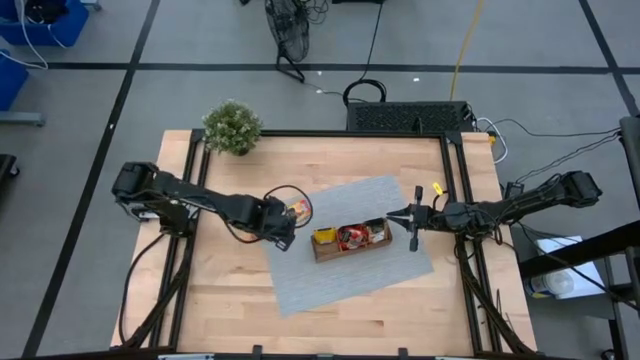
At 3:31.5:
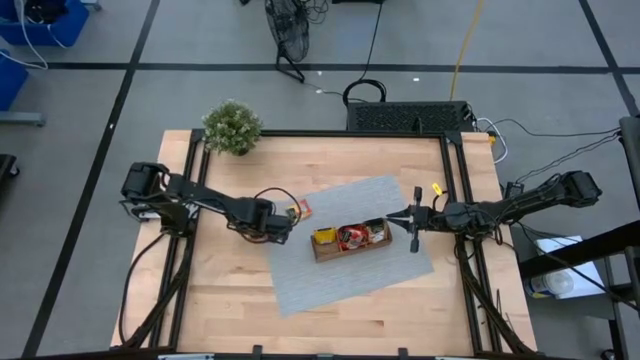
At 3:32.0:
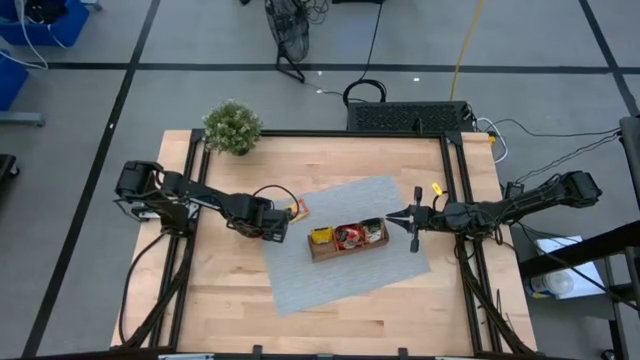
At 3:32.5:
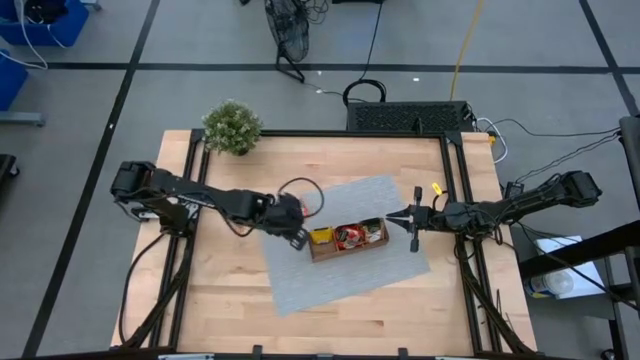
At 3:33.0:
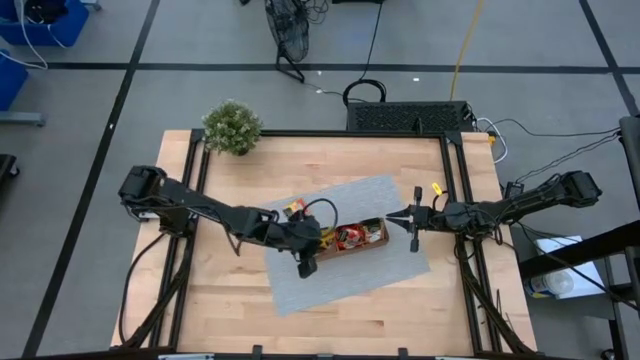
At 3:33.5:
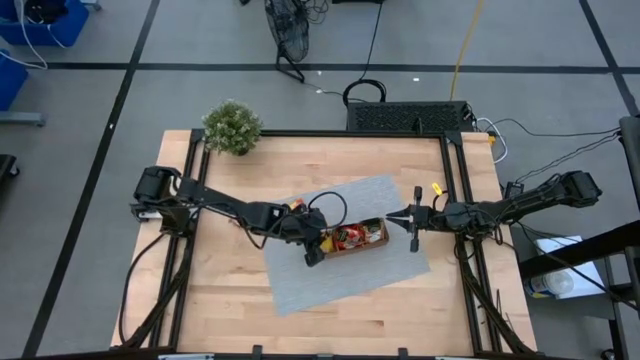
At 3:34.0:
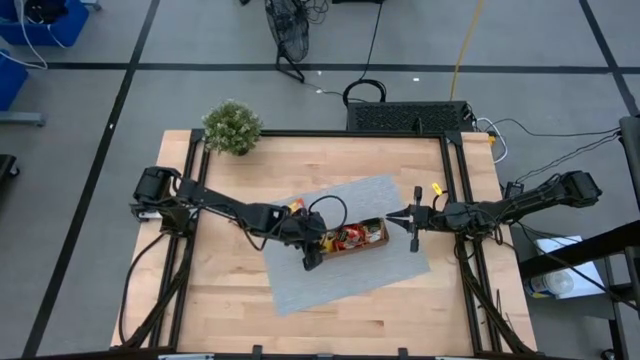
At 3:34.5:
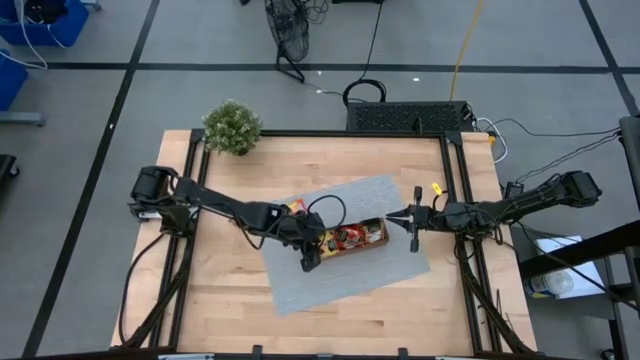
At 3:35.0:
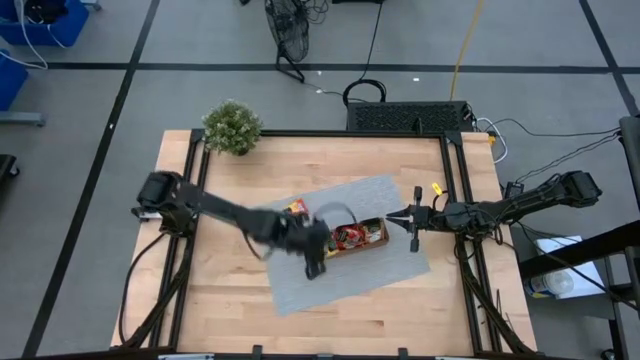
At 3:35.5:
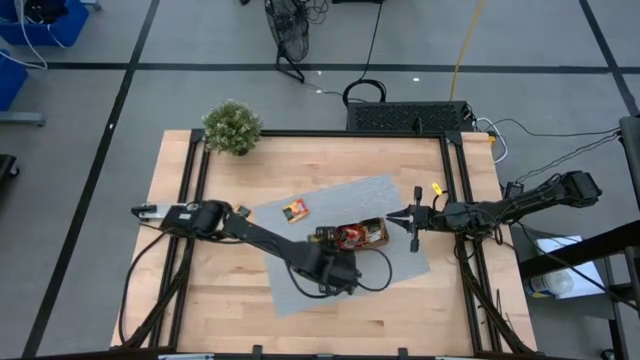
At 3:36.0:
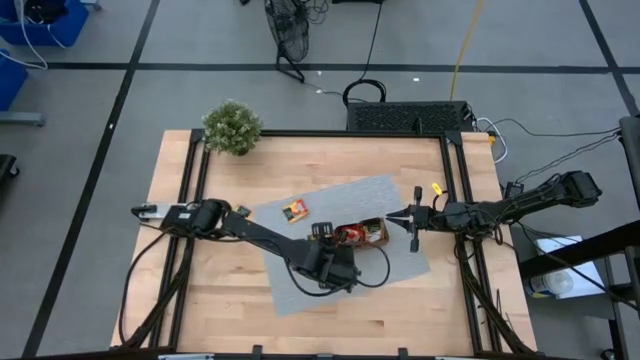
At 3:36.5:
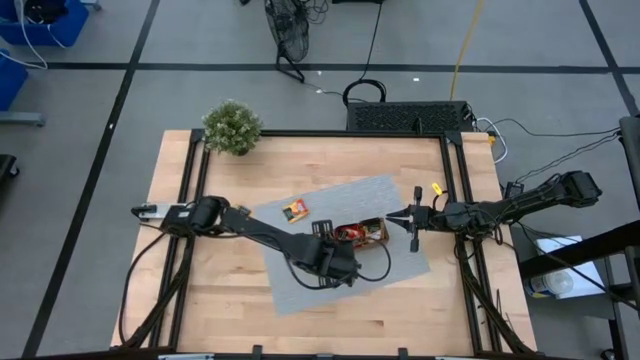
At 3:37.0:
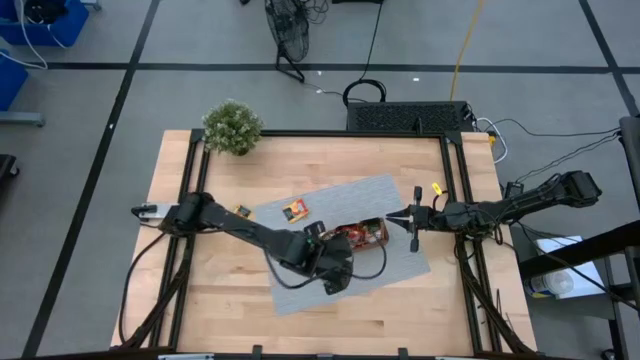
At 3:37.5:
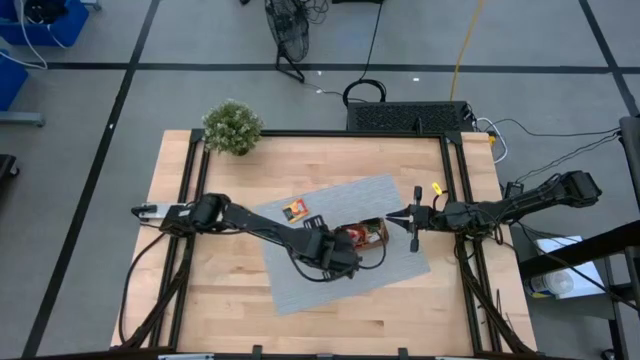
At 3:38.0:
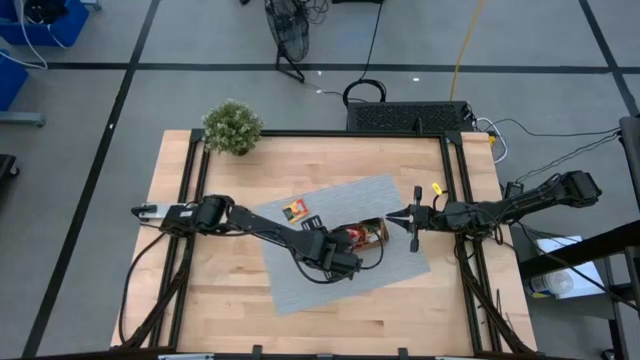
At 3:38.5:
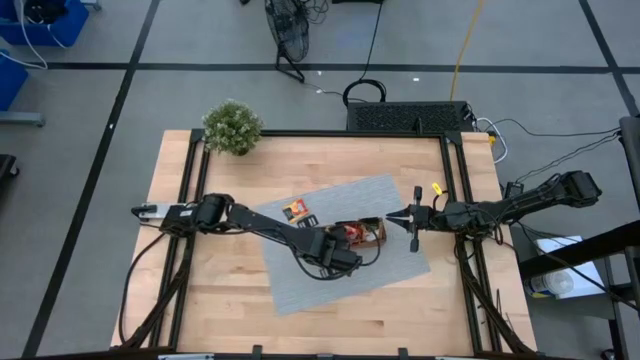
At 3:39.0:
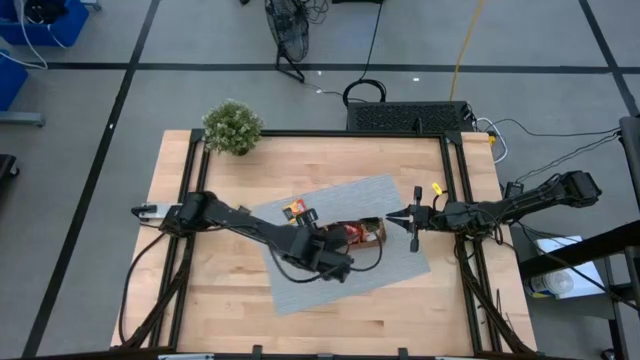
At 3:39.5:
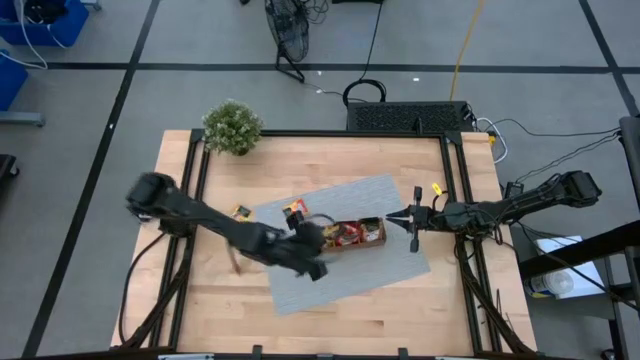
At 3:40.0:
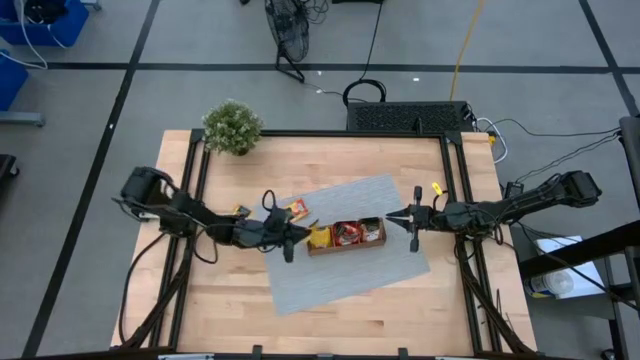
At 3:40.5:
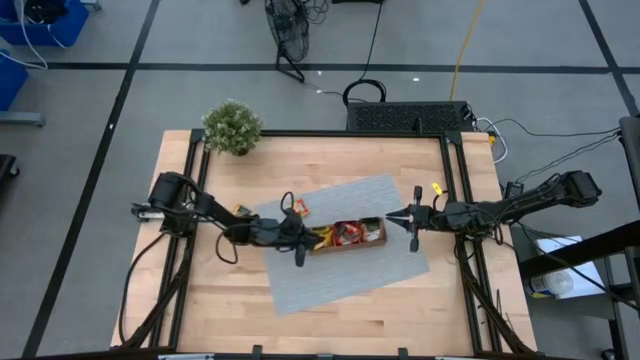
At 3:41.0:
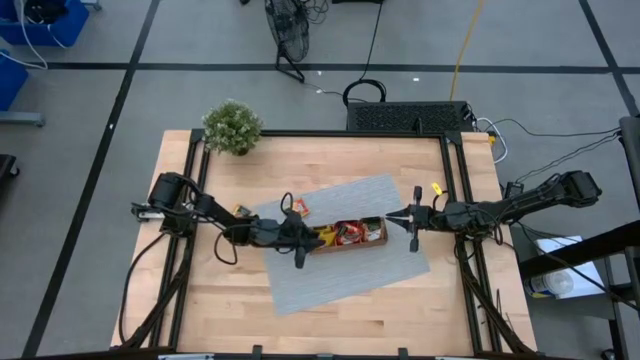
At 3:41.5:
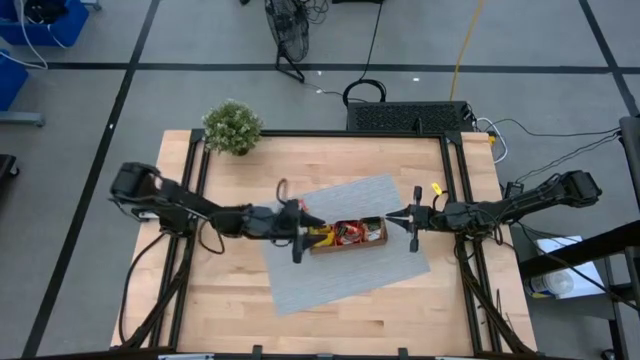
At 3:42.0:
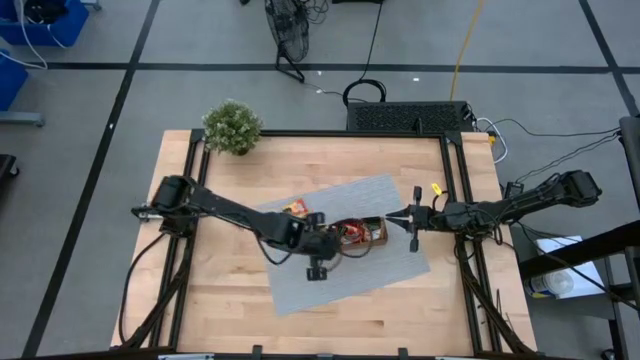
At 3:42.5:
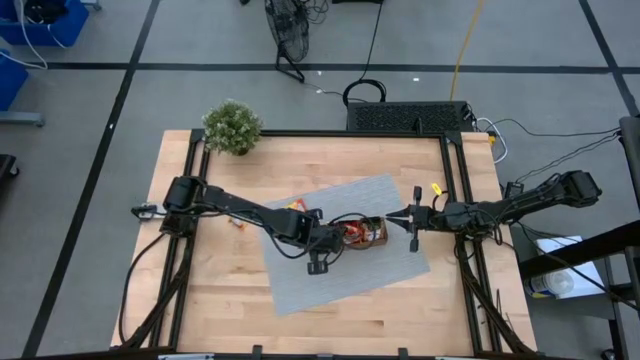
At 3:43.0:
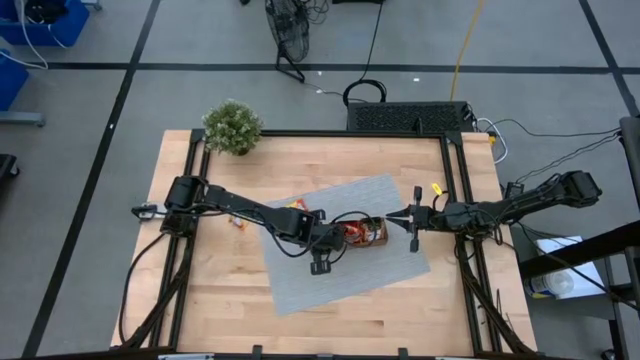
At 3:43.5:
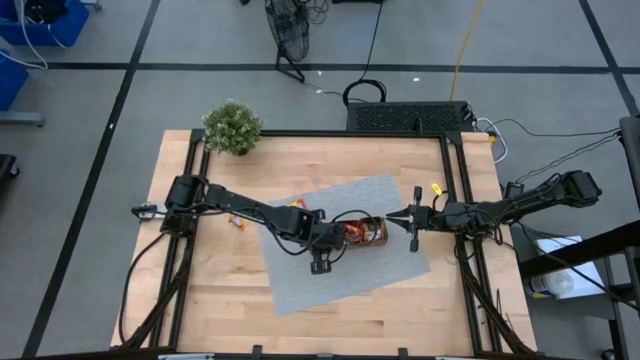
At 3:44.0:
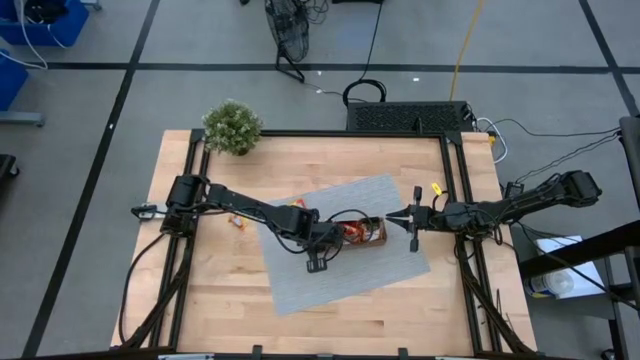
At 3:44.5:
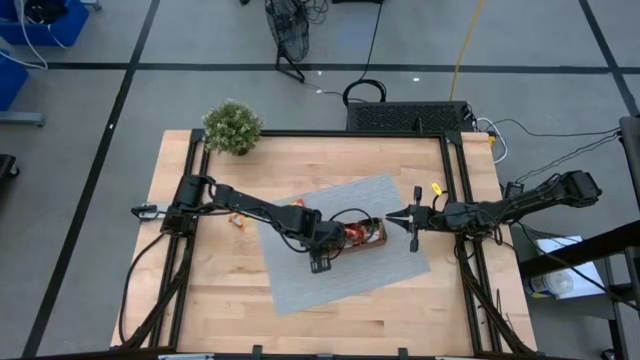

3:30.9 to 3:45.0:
Task: Pick & Place Tea
Put the yellow tea bag into the left section of the wooden organizer

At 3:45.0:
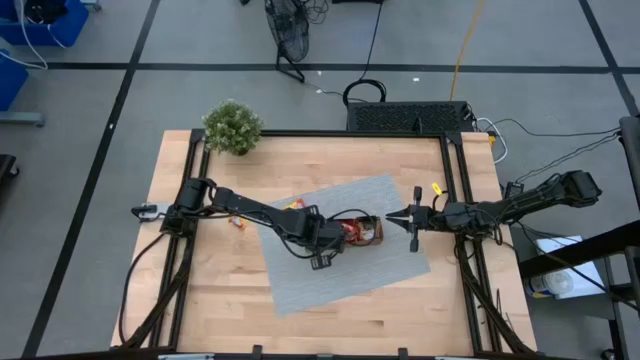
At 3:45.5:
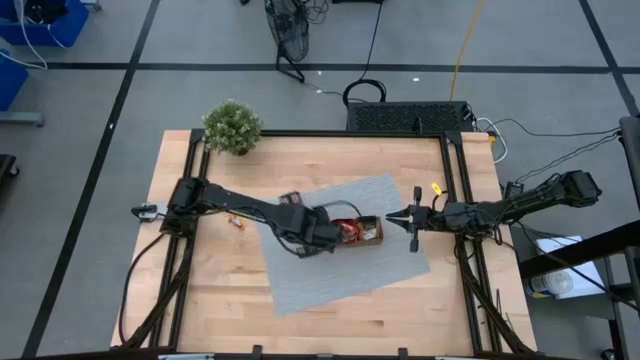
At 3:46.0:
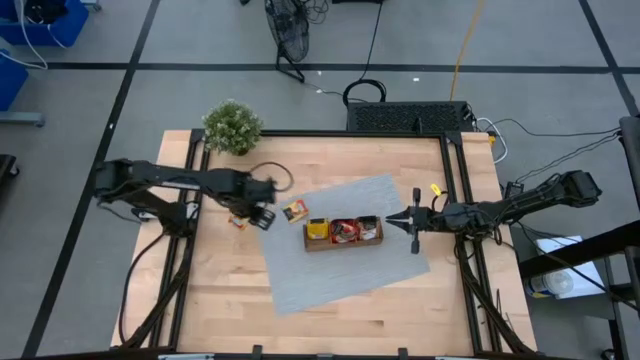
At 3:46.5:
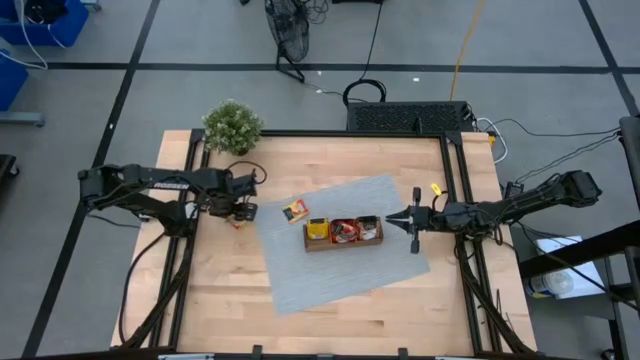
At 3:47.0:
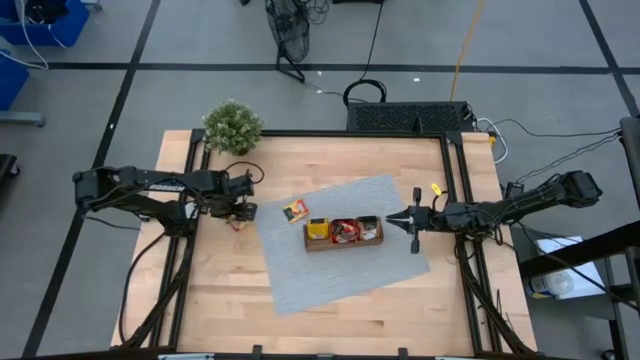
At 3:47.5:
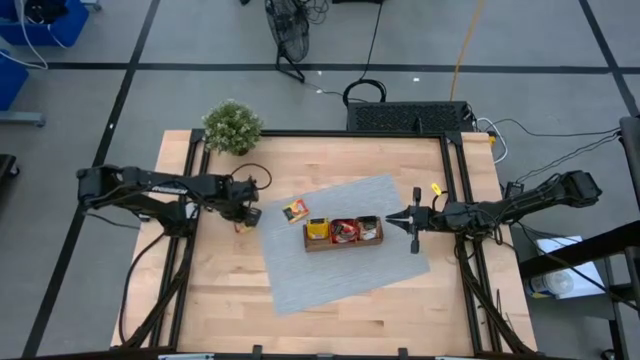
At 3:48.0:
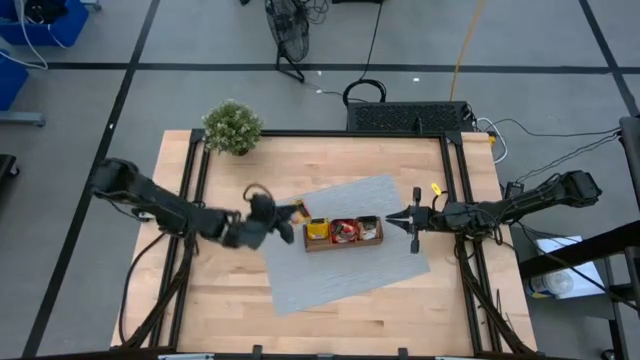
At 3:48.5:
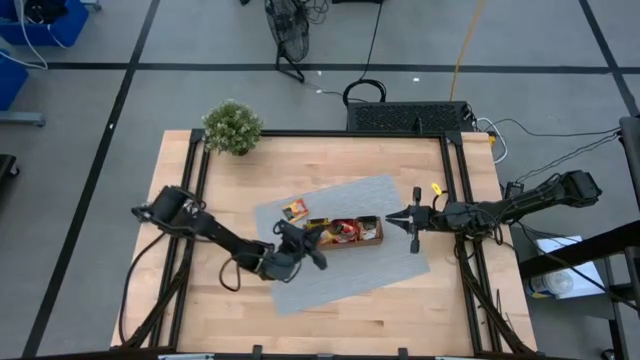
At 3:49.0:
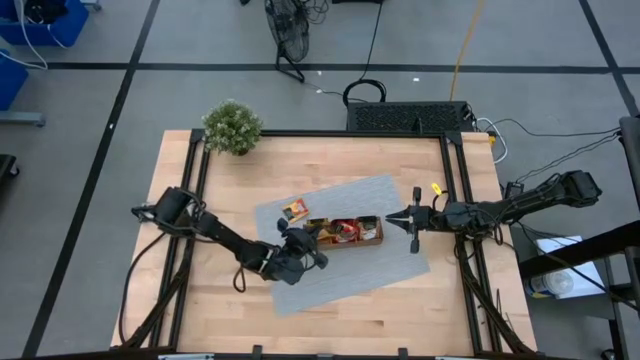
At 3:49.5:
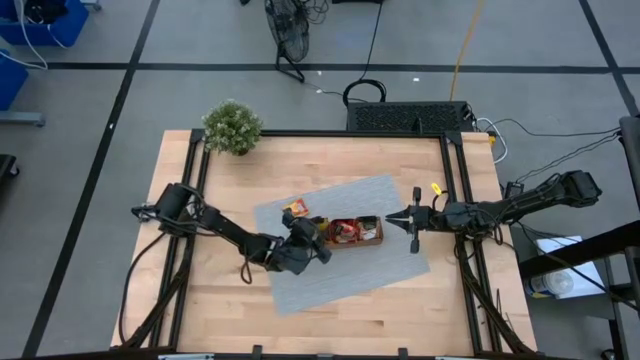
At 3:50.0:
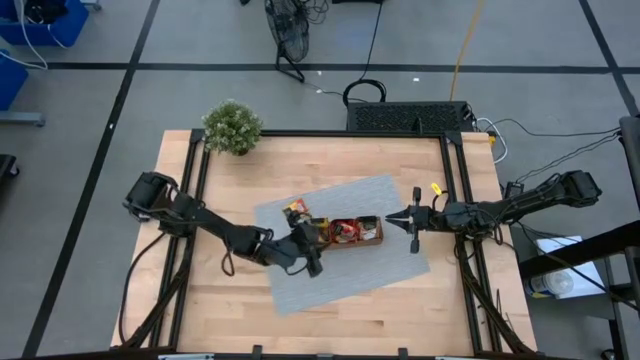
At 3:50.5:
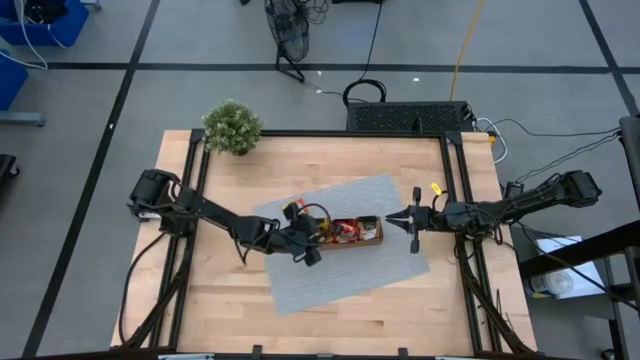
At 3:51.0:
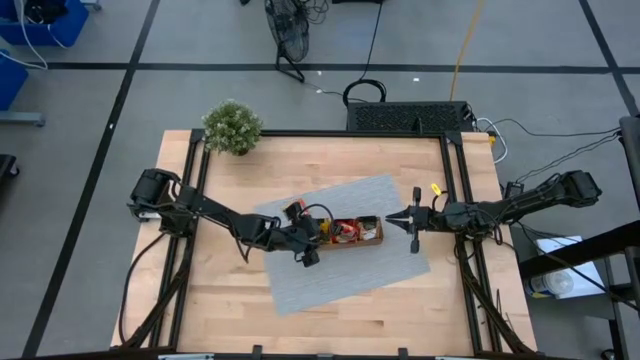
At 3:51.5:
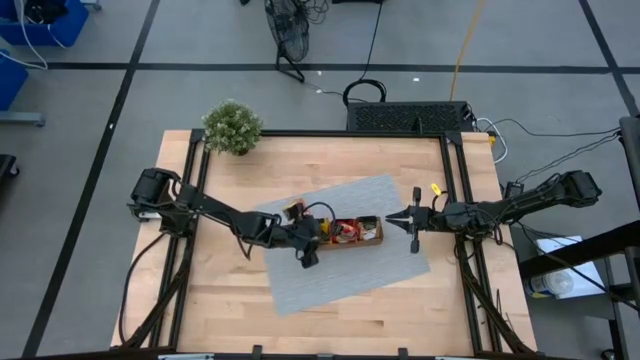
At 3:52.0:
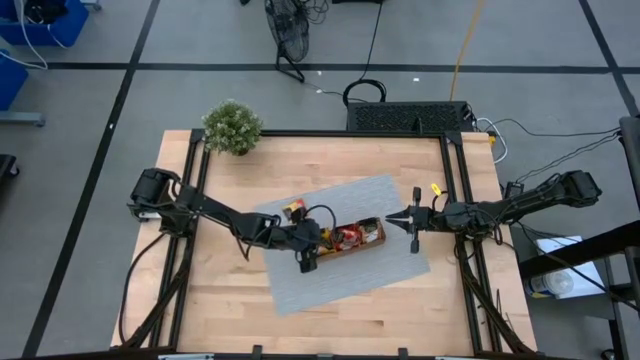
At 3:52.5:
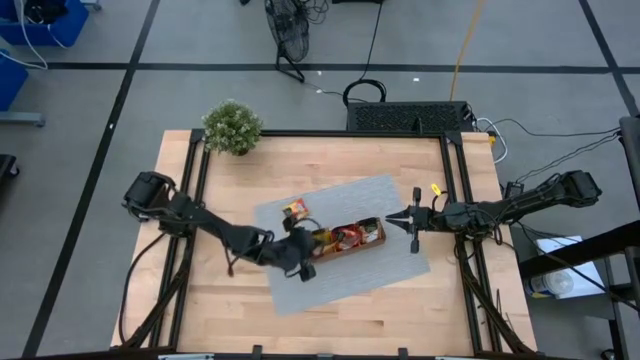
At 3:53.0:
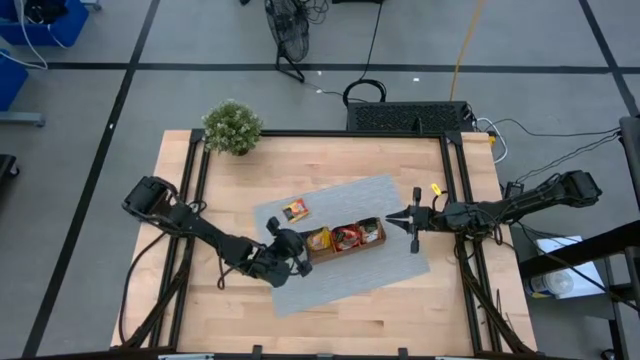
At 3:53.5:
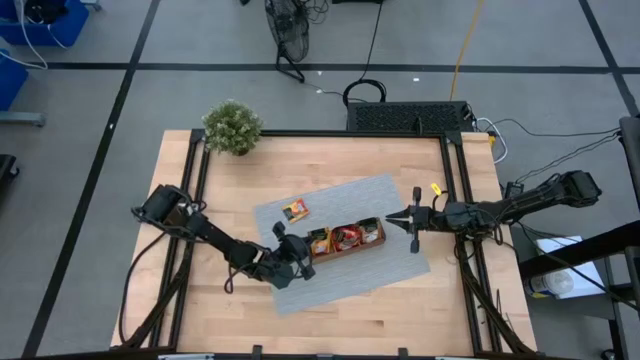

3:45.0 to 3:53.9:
Put the yellow tea bag into the left section of the wooden organizer
